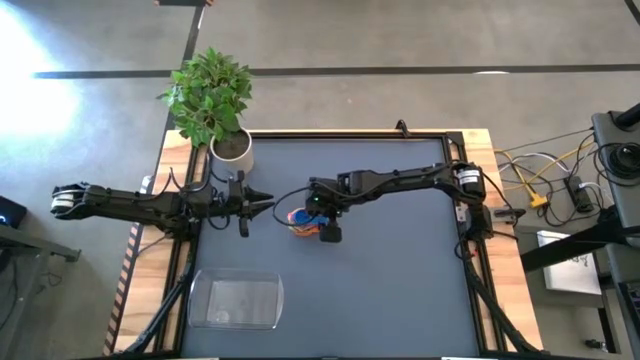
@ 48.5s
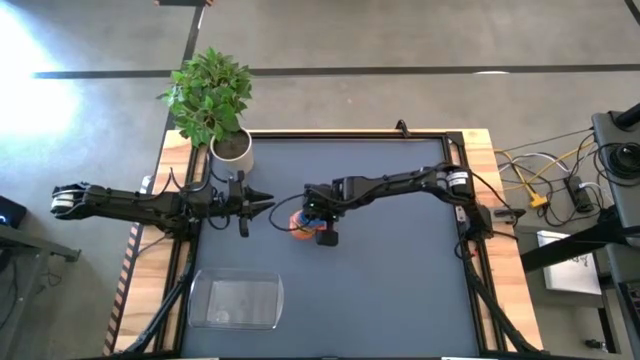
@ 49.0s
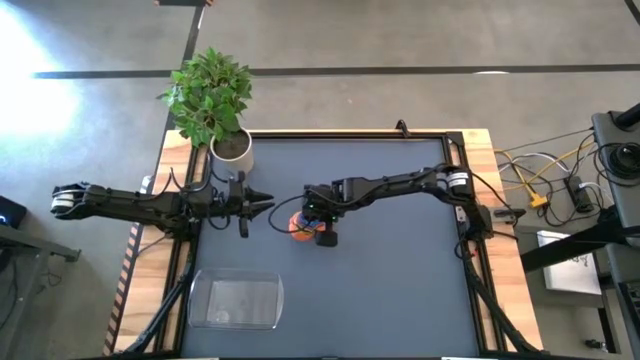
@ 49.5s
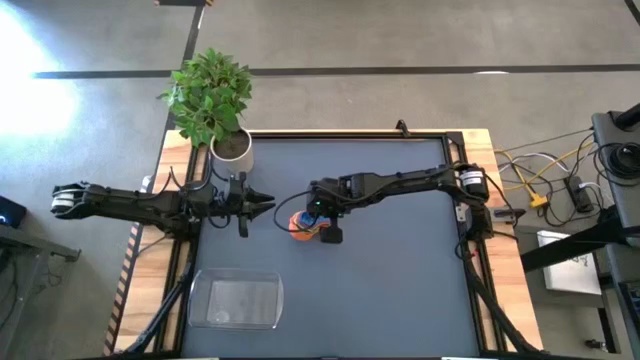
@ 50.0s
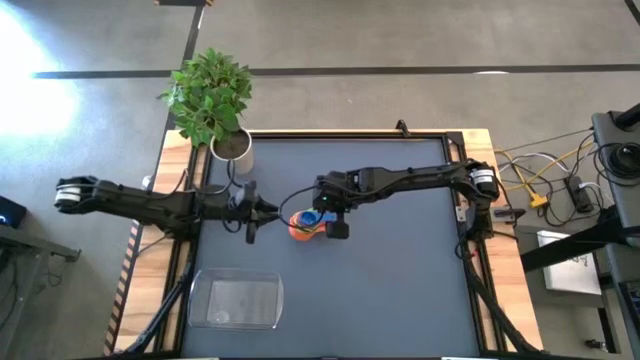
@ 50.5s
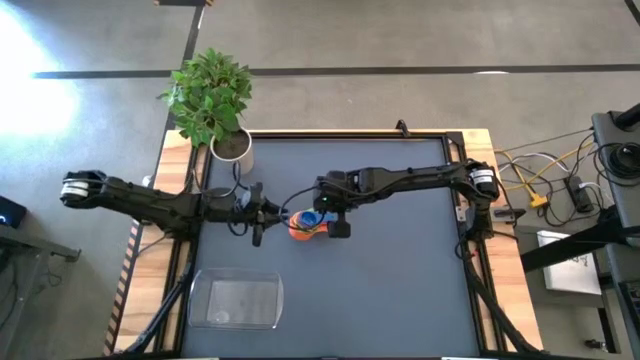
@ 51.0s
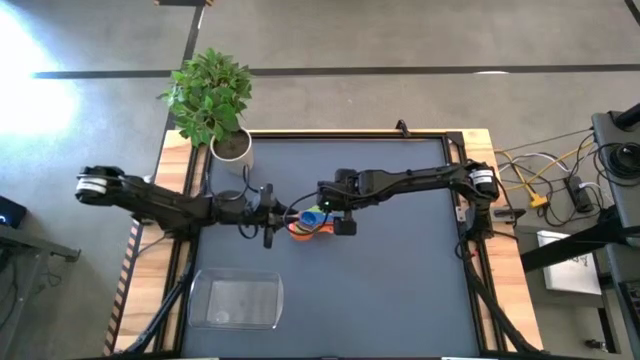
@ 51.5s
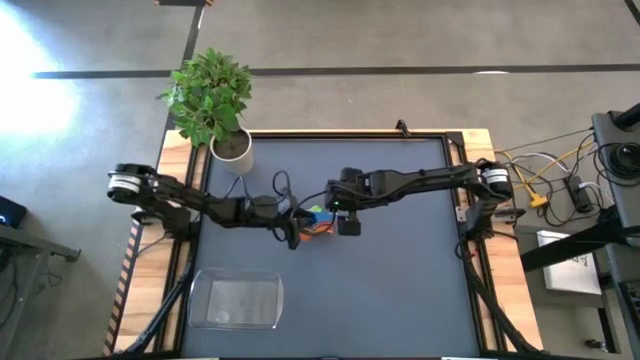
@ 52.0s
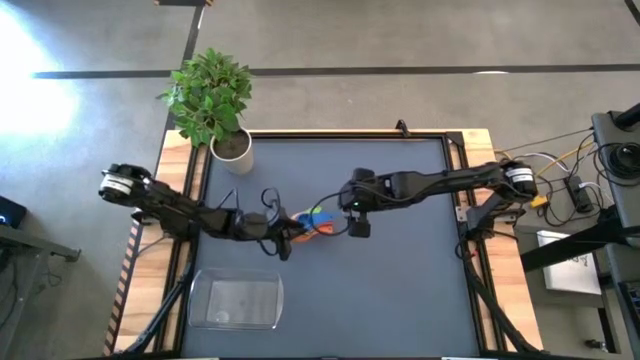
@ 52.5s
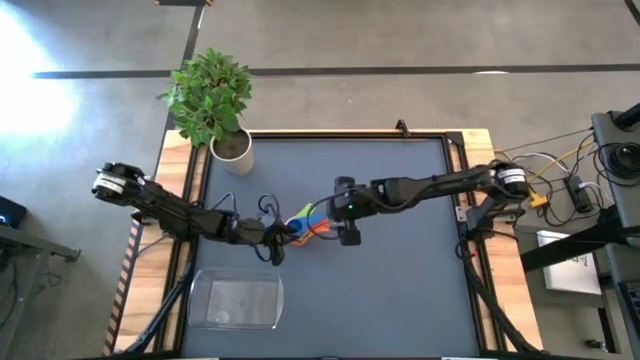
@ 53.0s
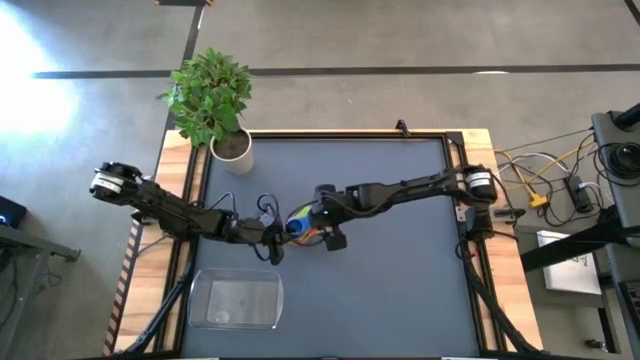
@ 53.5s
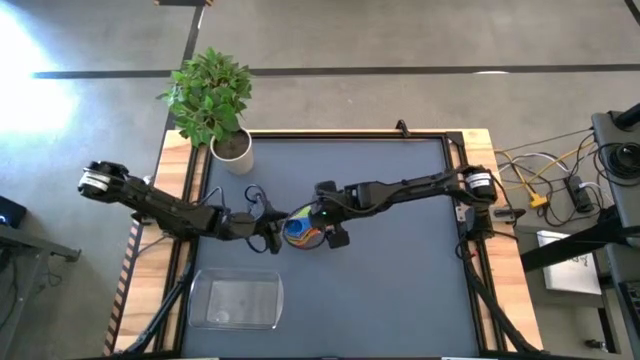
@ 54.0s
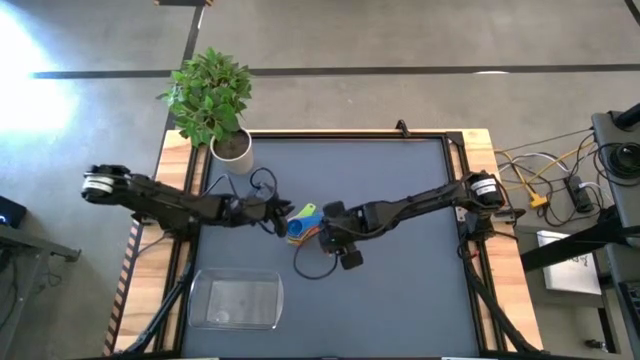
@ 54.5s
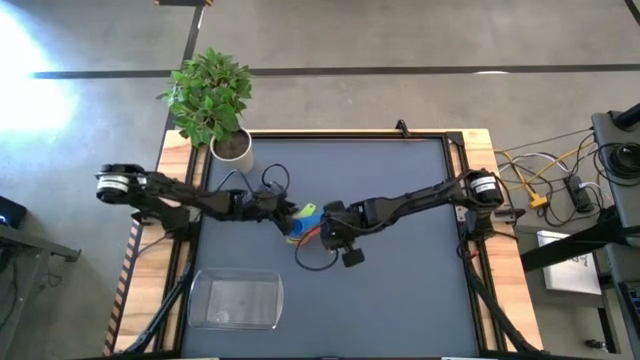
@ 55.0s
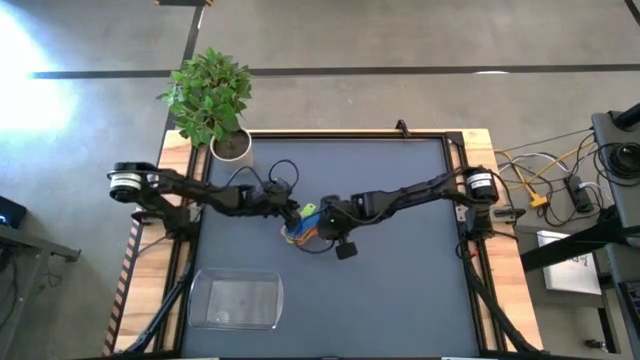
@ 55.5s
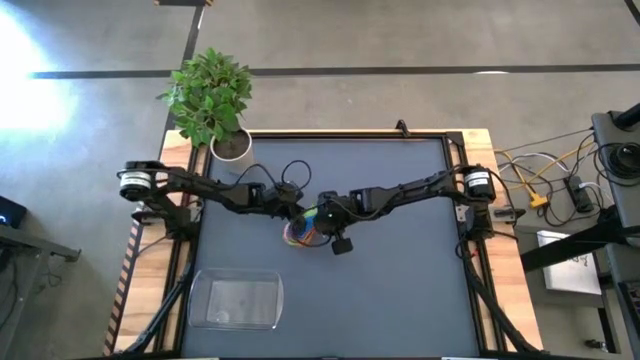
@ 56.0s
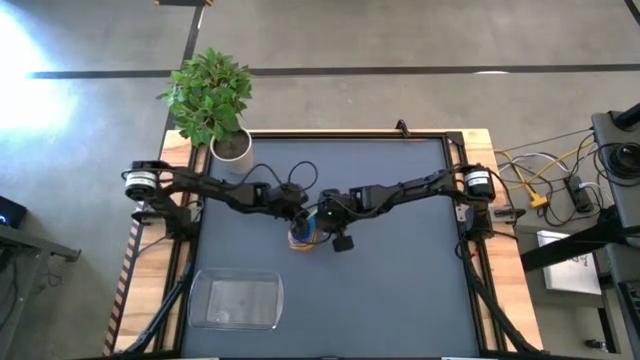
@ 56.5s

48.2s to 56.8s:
Task: Nest measuring cups in basket
Adjust the stacked measuring cups

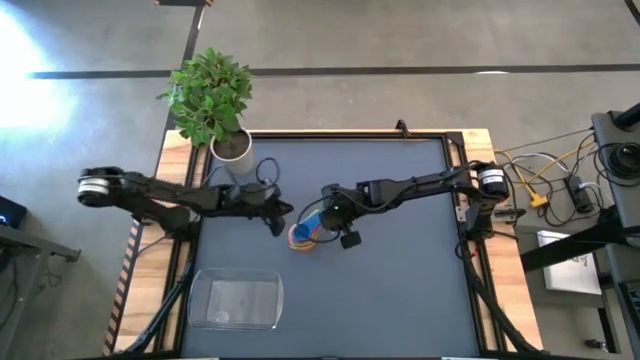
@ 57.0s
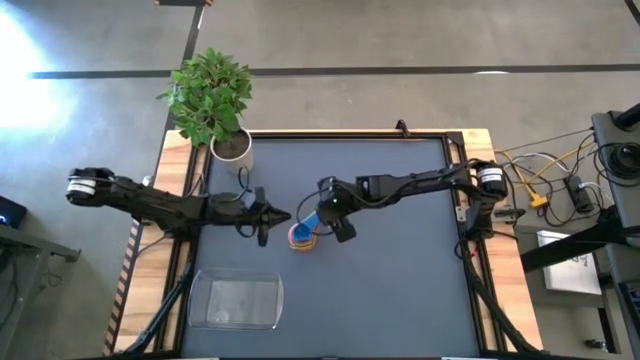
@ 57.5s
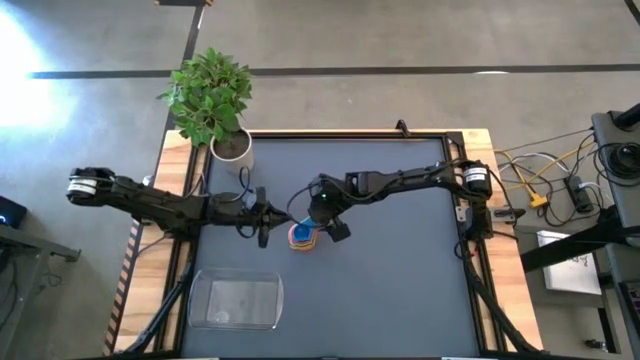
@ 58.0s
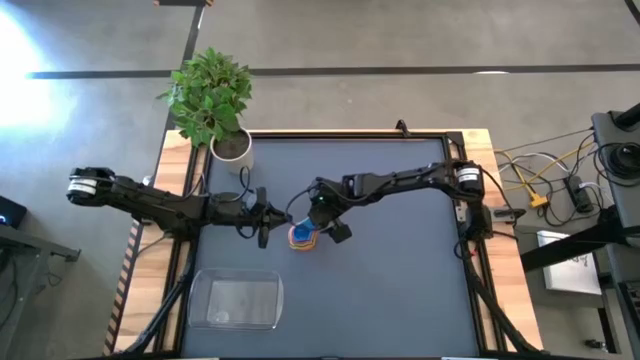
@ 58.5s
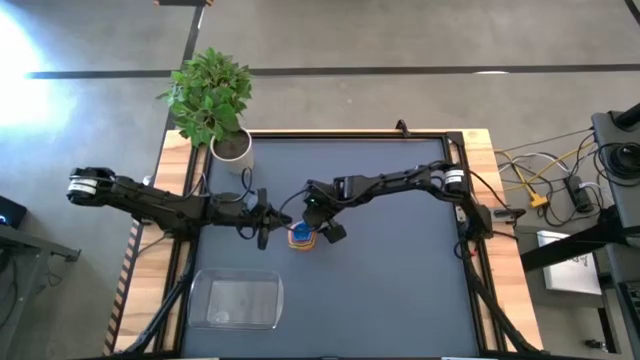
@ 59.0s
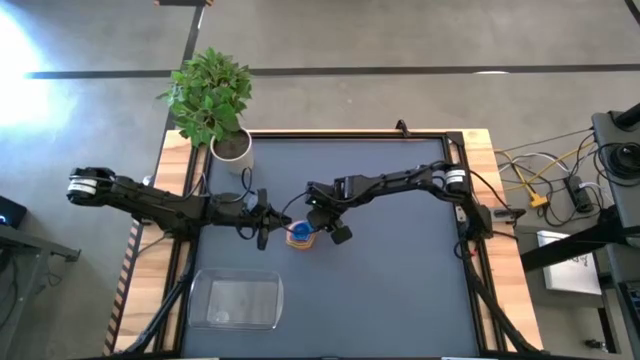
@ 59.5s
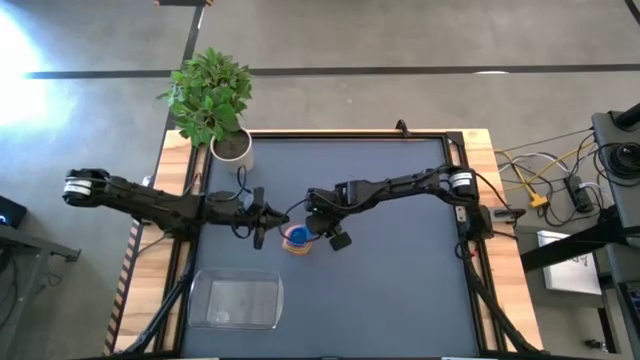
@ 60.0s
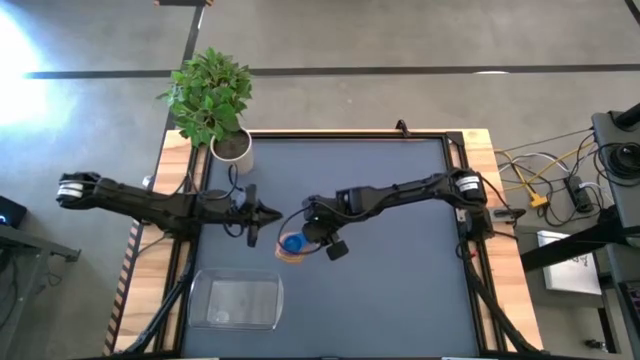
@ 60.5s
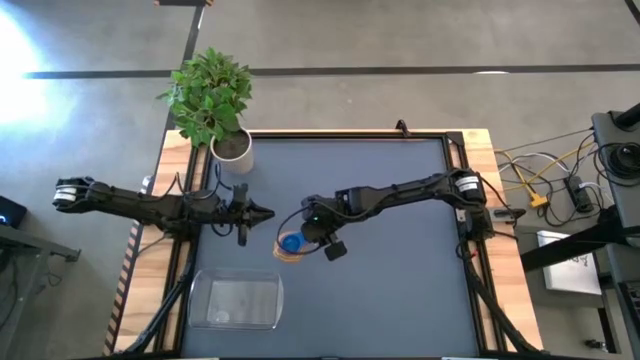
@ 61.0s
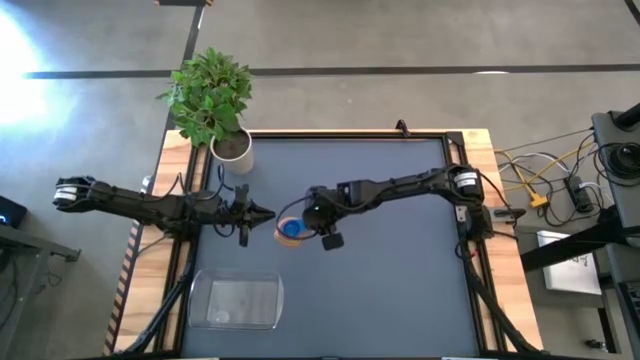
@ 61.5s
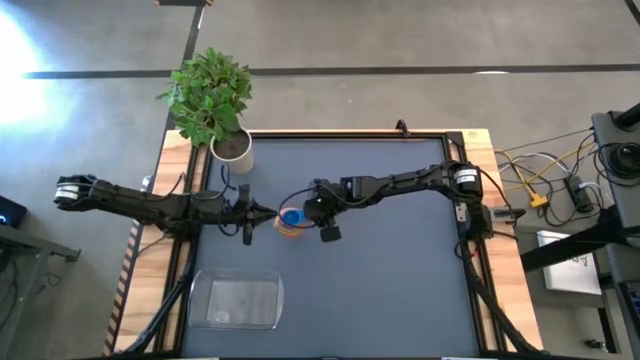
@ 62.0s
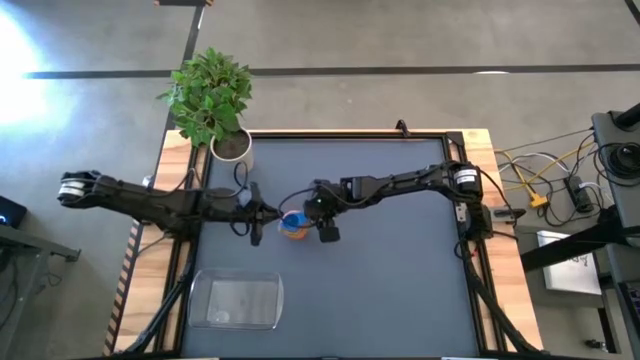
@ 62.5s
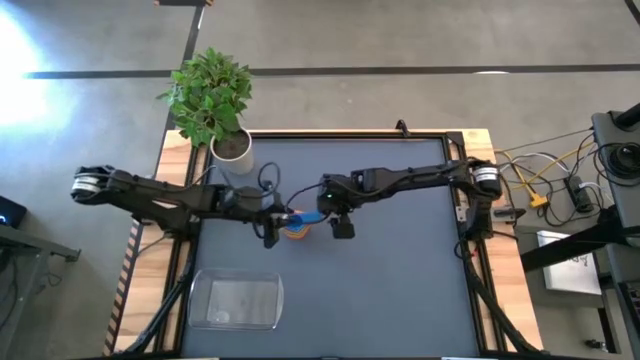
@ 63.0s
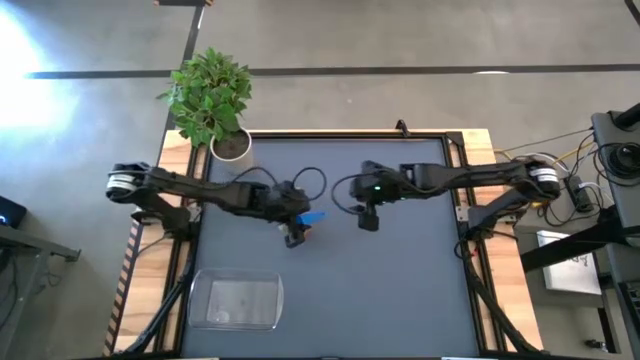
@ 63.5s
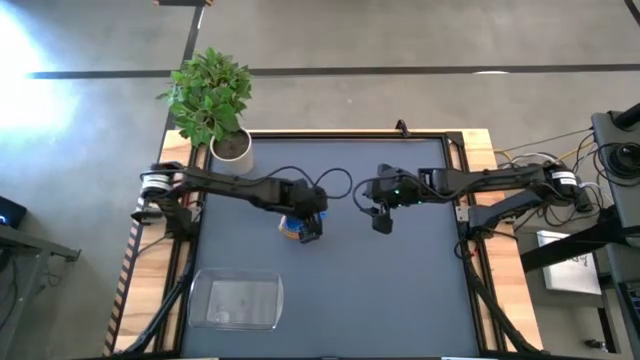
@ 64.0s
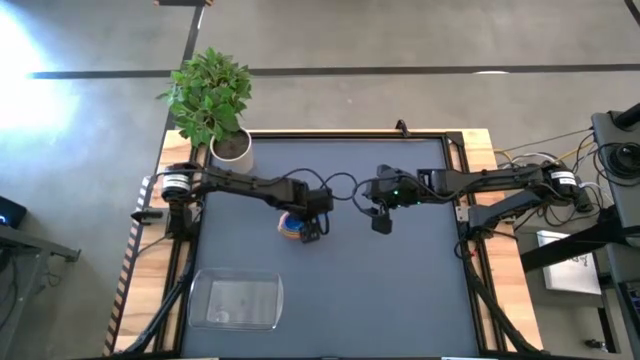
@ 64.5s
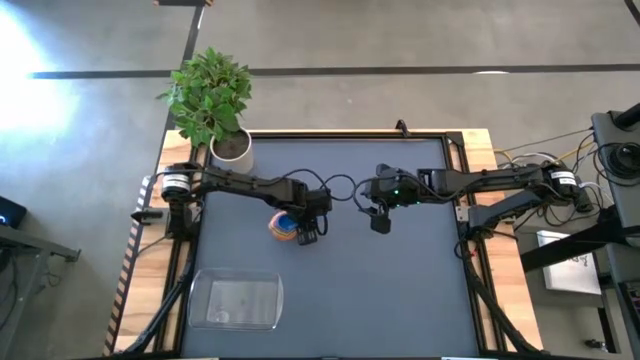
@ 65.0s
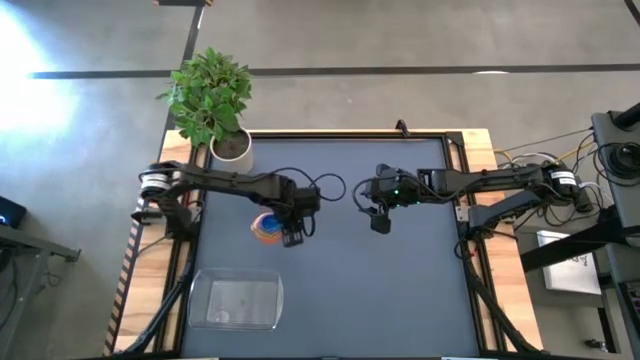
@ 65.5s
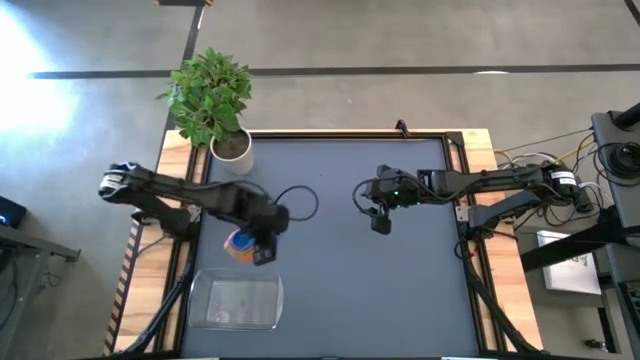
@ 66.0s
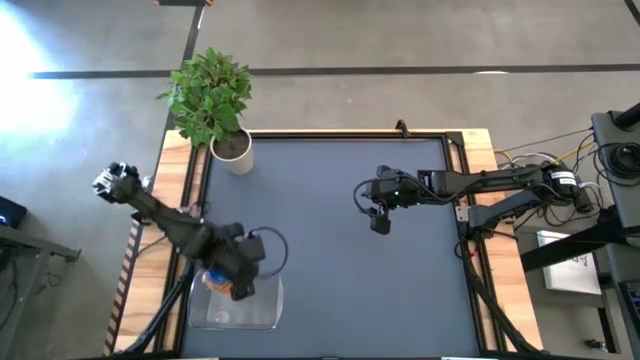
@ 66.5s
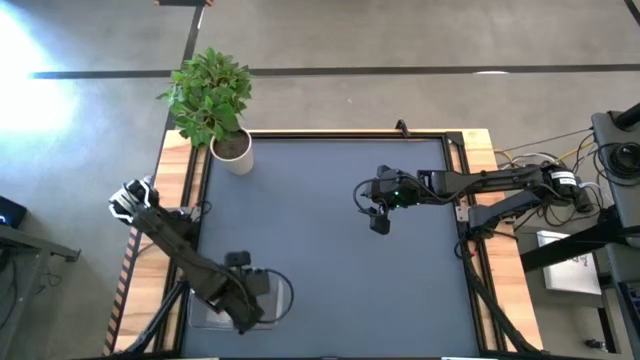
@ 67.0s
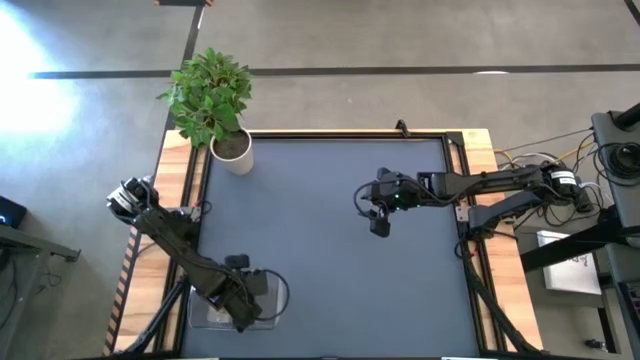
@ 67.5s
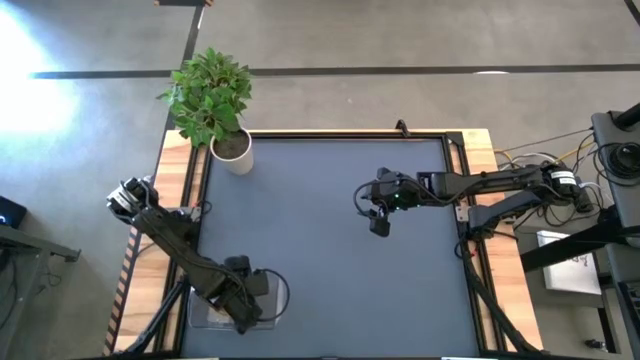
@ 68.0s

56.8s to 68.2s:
Put the stacked measuring cups into the transparent bin
